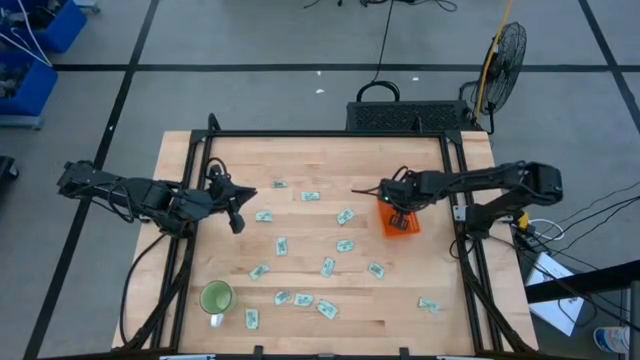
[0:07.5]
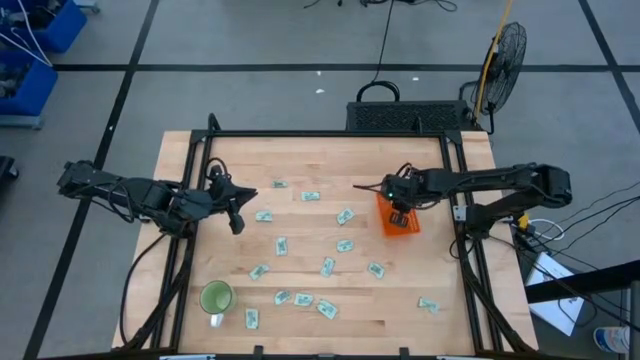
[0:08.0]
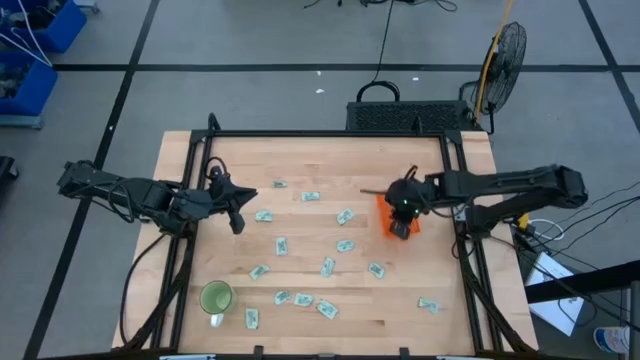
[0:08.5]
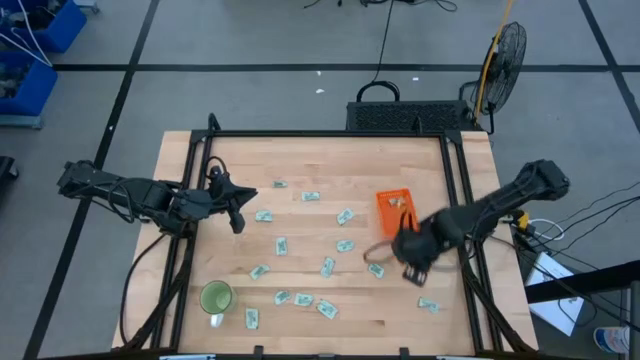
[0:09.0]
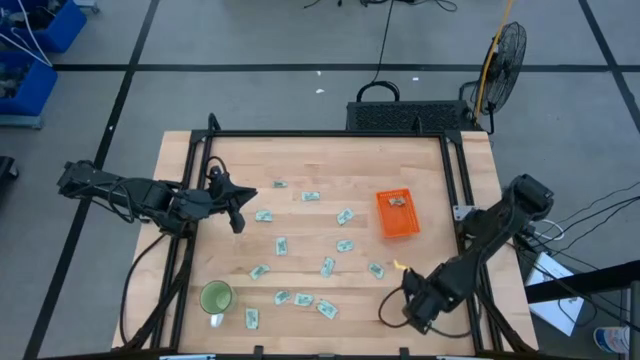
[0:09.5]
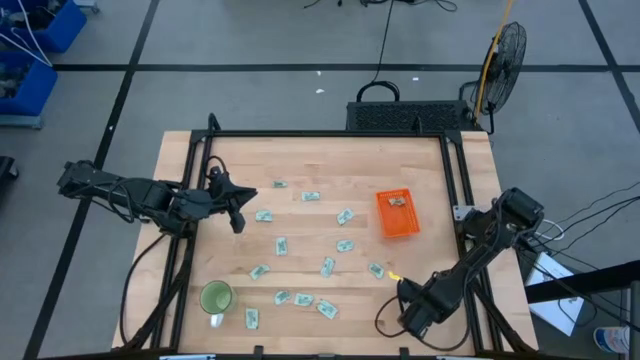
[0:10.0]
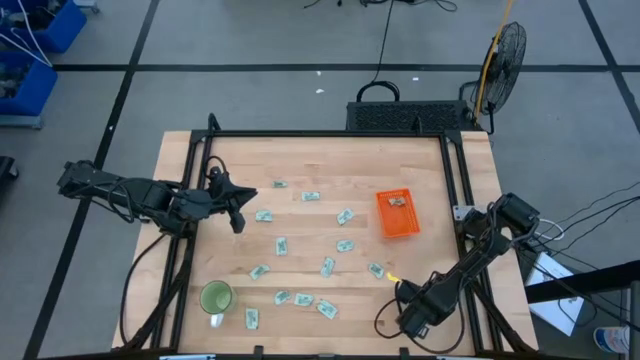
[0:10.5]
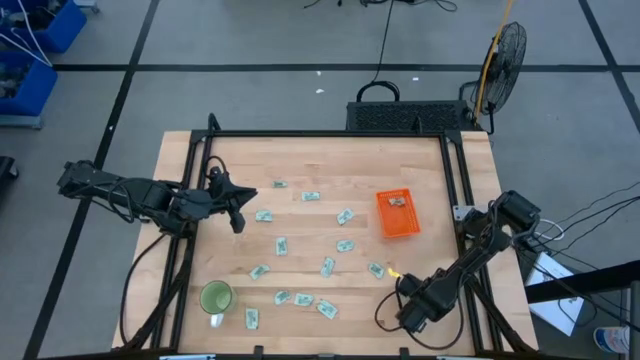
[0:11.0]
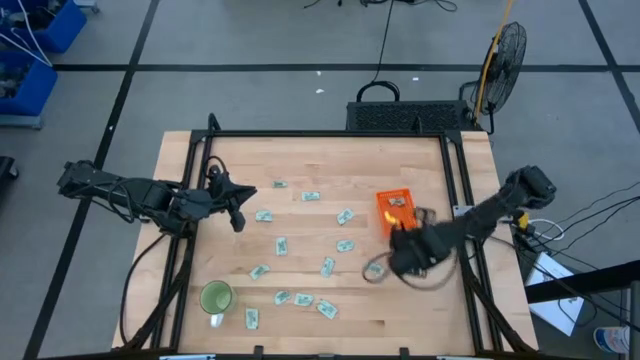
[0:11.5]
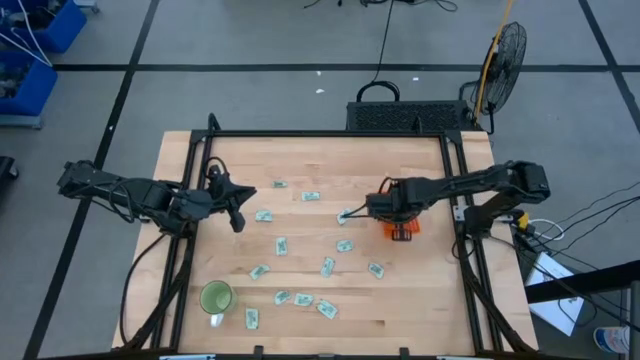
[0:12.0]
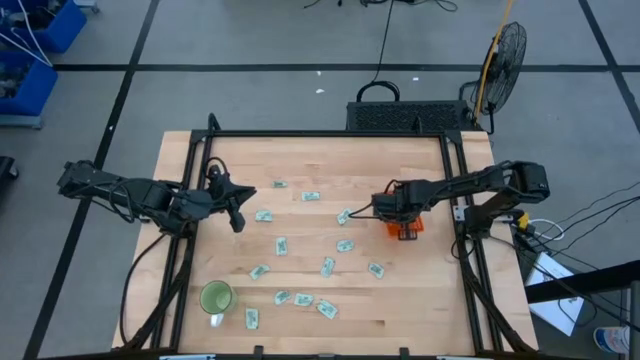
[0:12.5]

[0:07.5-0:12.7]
Task: Pick and place Stevia / Truvia into bins
Put the stevia packet into the orange basket

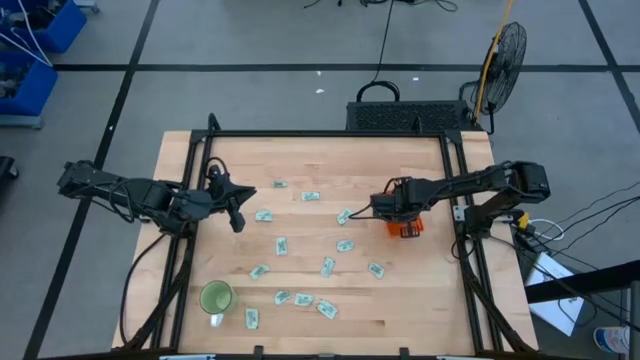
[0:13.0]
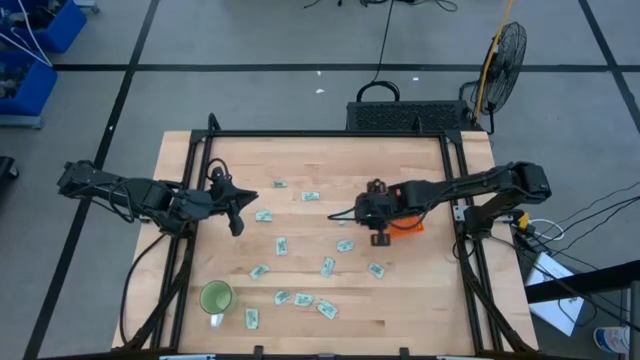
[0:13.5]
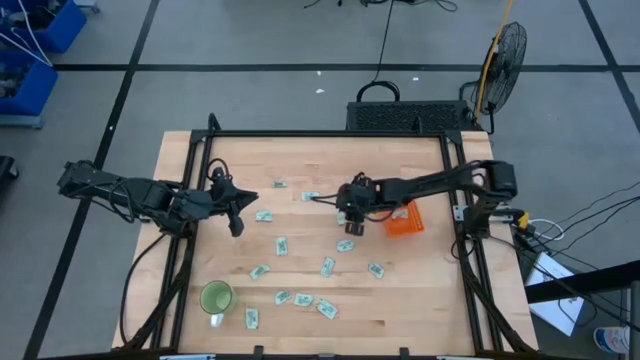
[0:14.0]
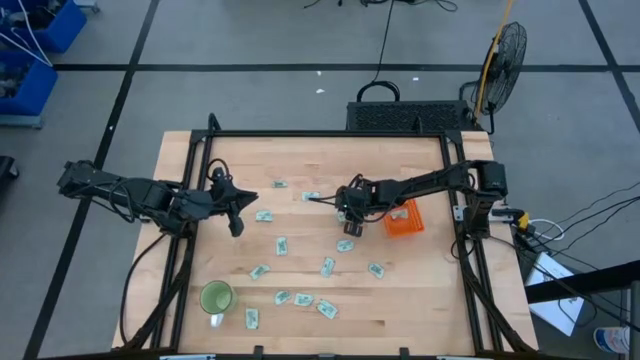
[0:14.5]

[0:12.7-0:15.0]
Put the stevia packet into the orange basket

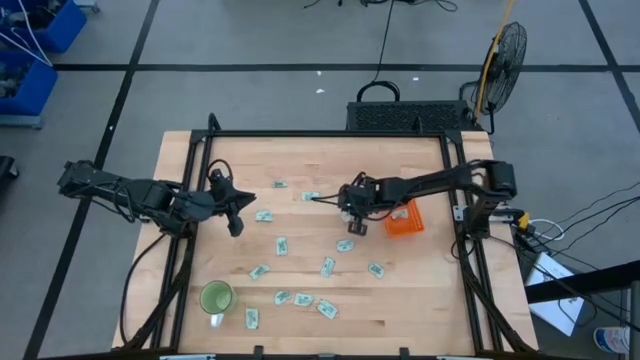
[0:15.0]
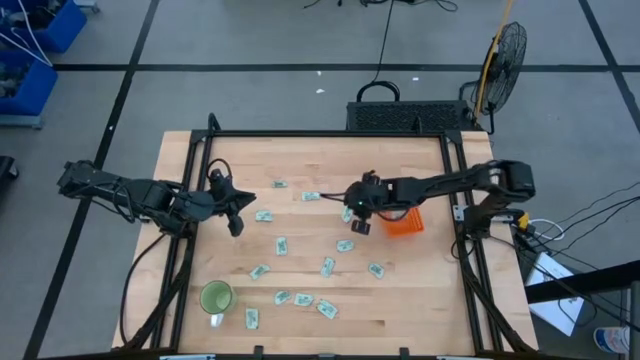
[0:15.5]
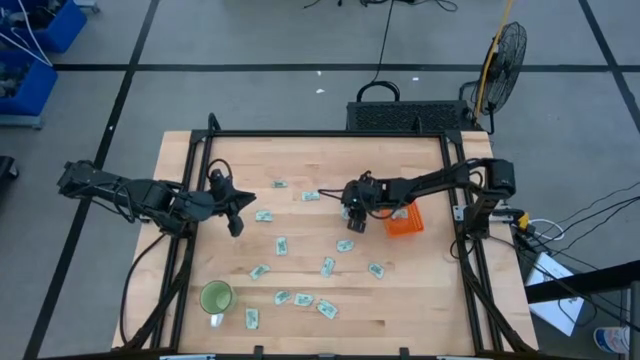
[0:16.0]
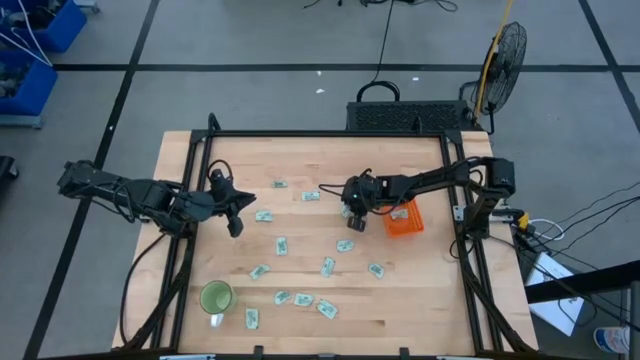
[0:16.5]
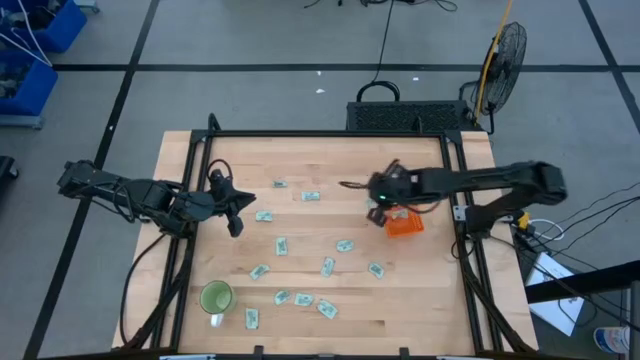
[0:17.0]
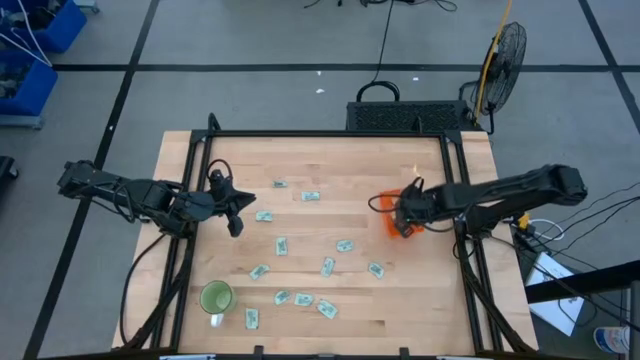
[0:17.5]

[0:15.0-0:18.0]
Put the stevia packet into the orange basket

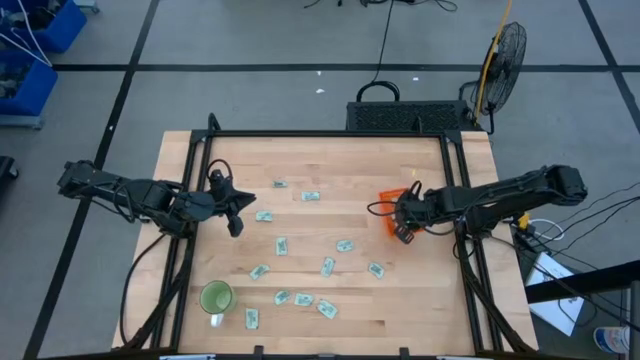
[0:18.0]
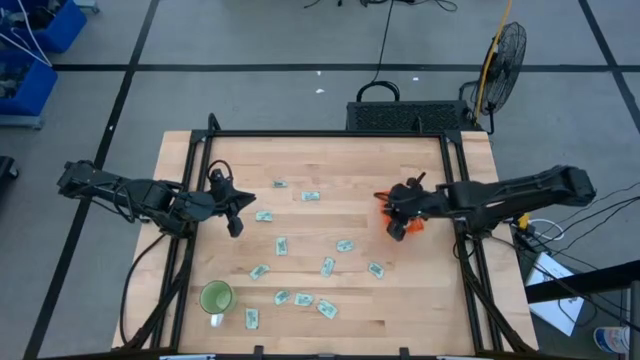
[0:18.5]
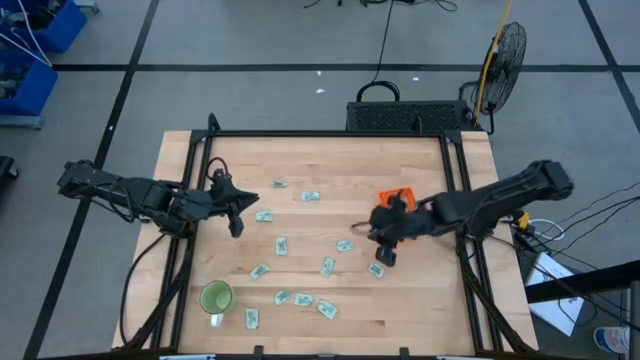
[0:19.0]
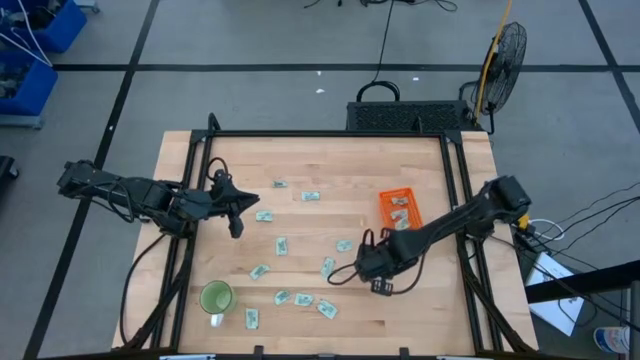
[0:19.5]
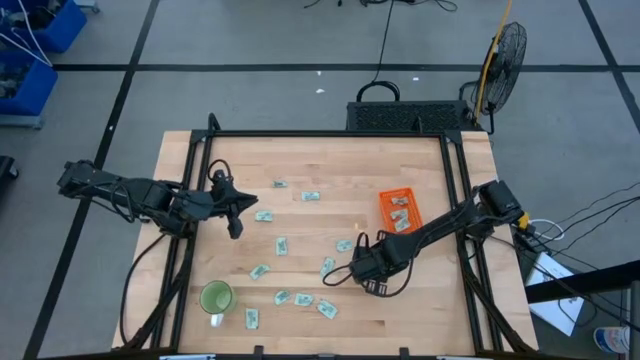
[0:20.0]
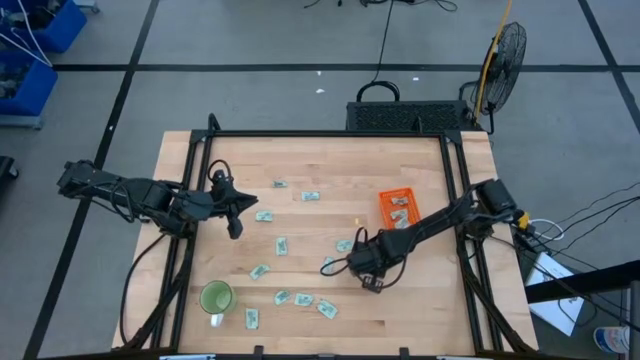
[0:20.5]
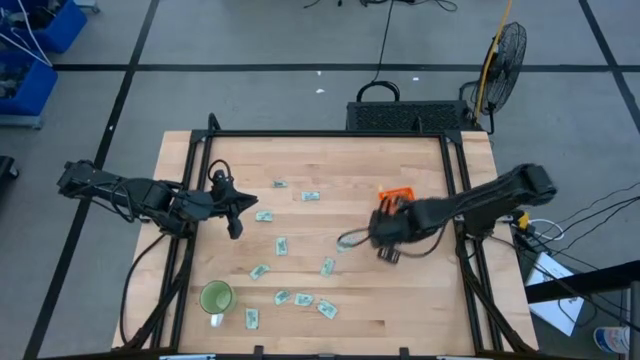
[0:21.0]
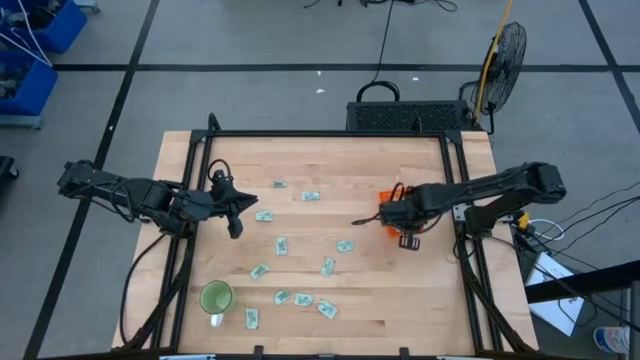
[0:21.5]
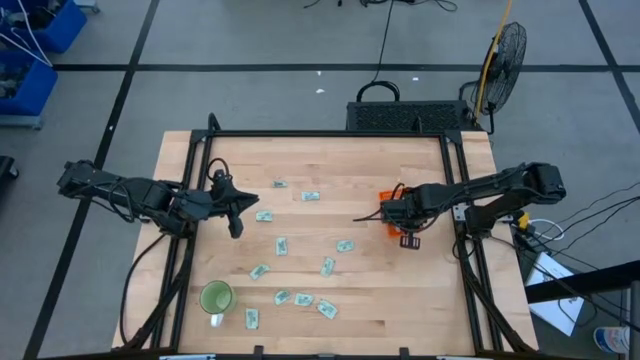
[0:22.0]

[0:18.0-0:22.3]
Put the stevia packet into the orange basket

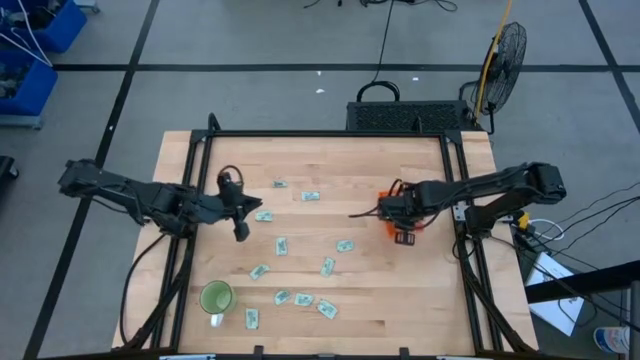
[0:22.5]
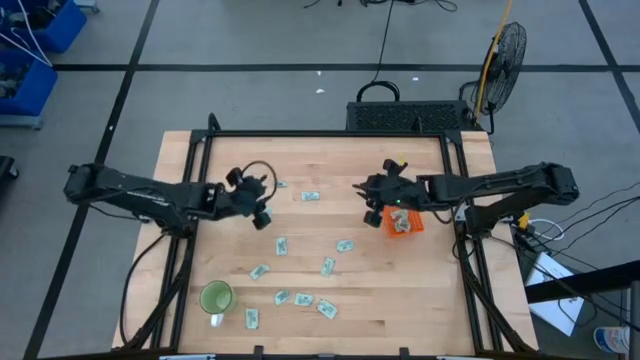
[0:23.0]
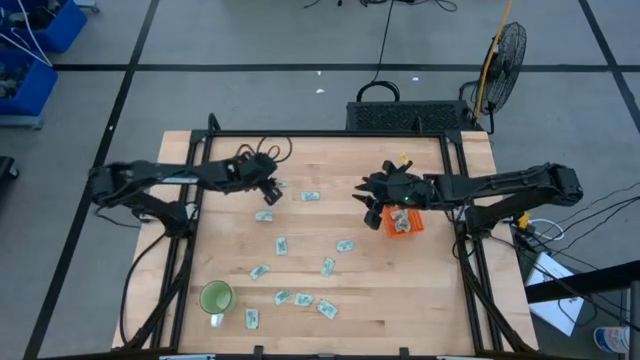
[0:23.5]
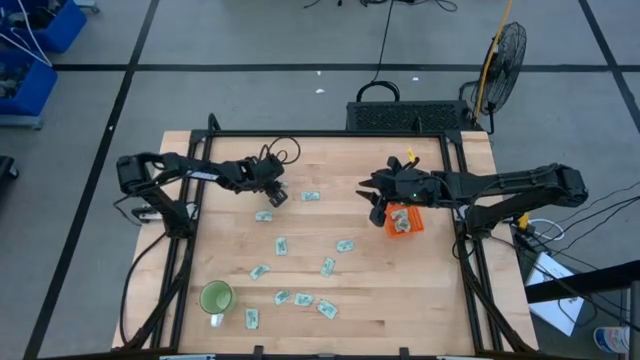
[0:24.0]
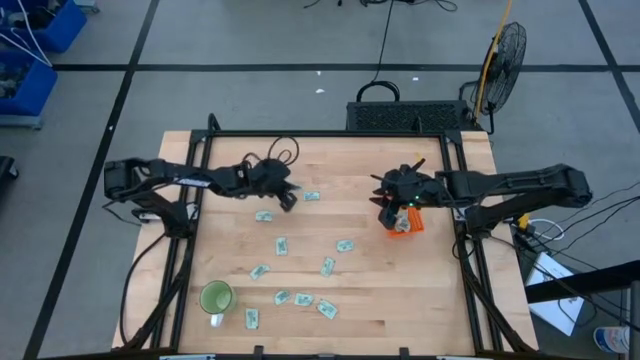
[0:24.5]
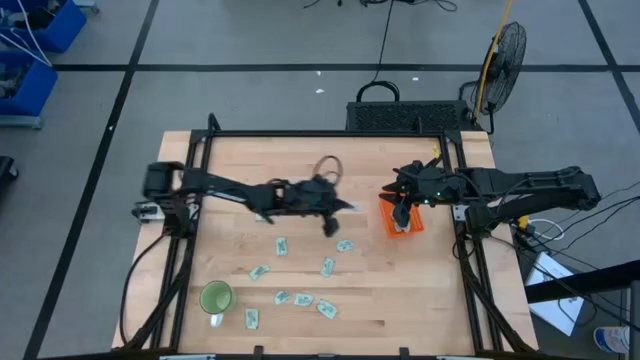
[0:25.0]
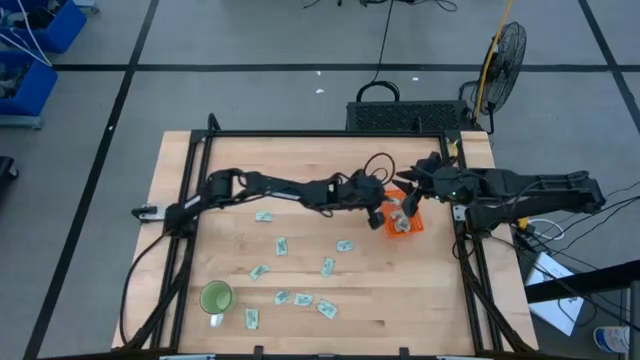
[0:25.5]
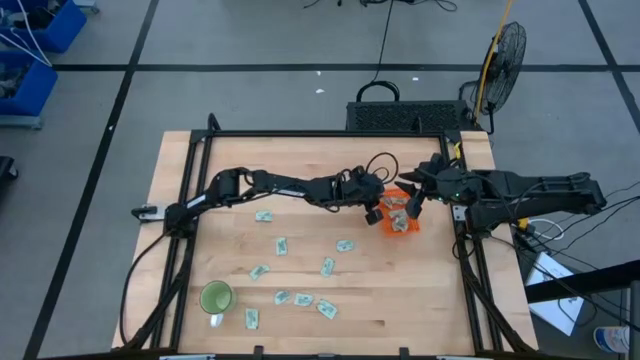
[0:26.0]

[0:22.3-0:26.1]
Put the stevia packet into the orange basket

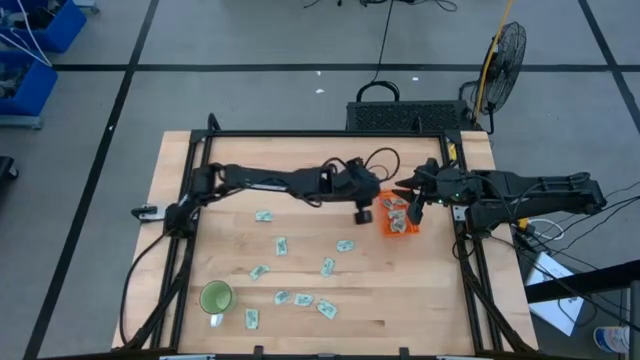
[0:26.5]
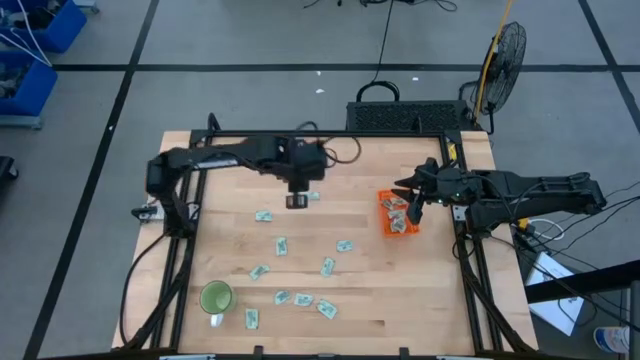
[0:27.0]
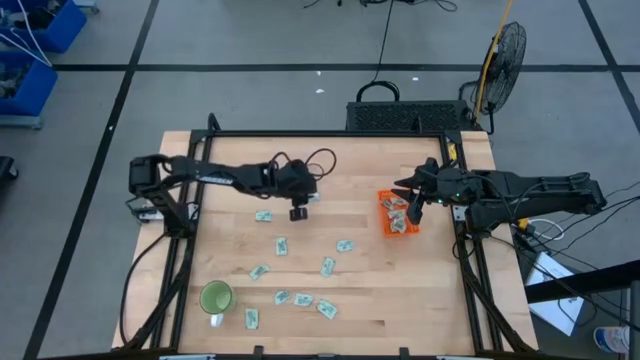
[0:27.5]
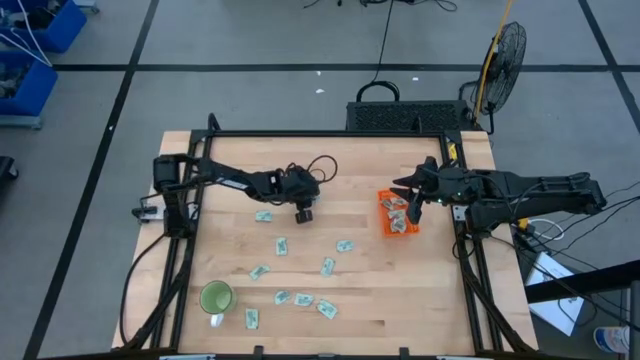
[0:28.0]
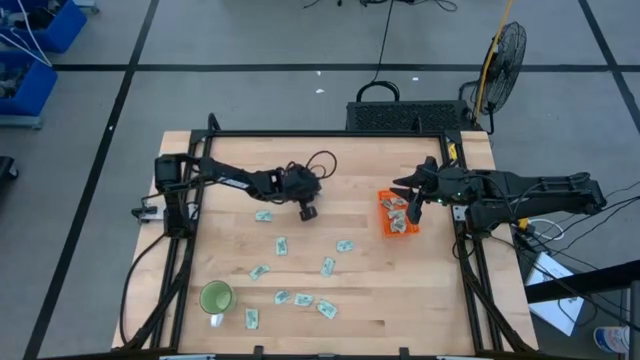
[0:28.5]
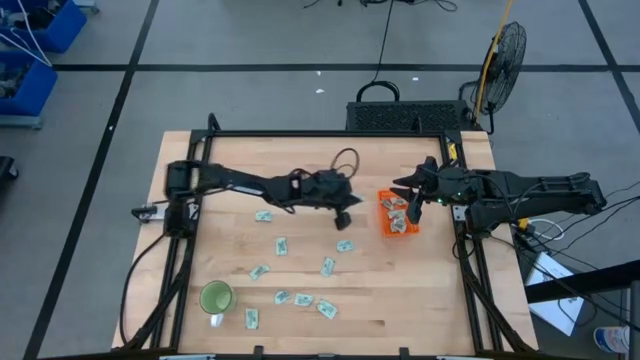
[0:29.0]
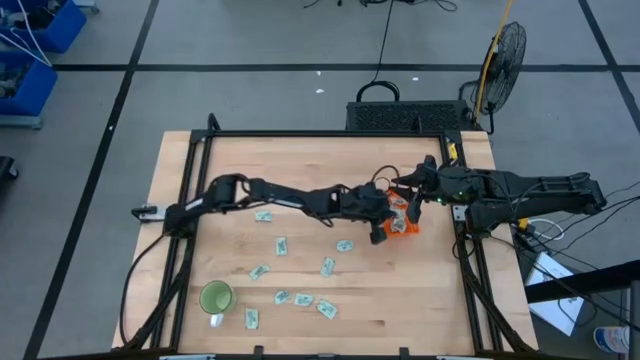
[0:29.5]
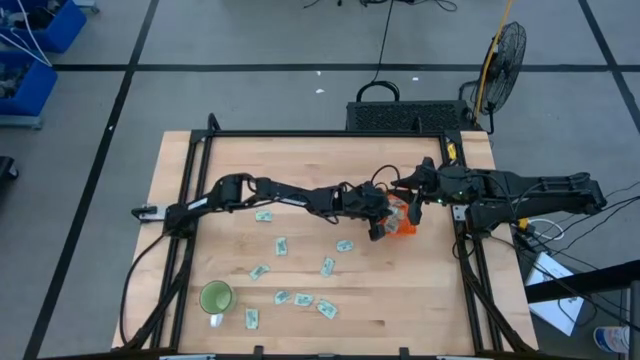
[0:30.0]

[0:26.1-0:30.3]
Put the stevia packet into the orange basket
